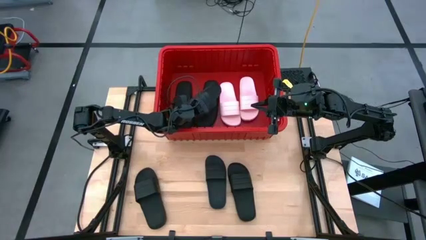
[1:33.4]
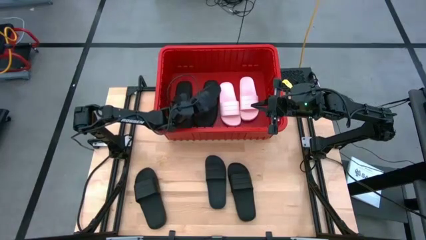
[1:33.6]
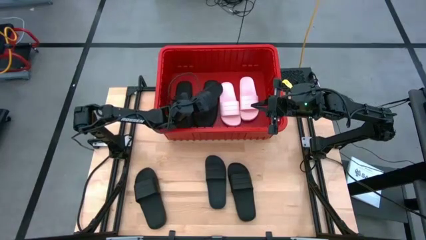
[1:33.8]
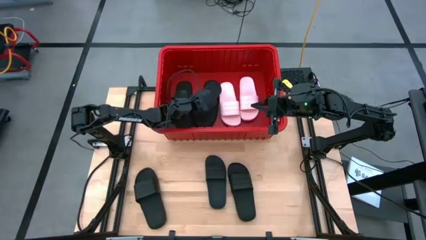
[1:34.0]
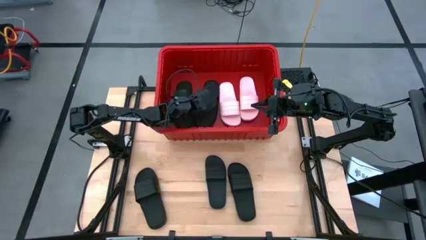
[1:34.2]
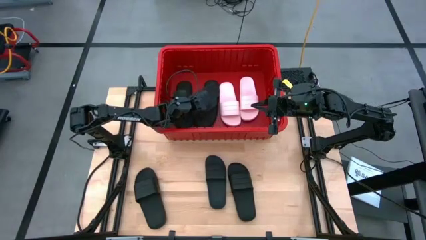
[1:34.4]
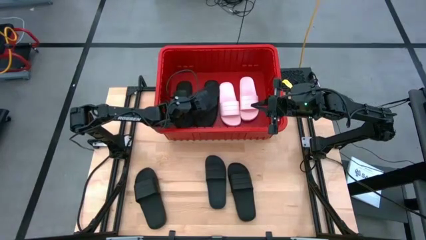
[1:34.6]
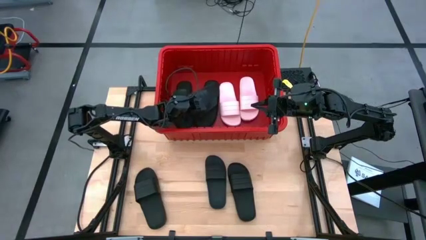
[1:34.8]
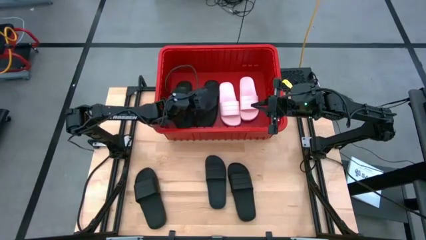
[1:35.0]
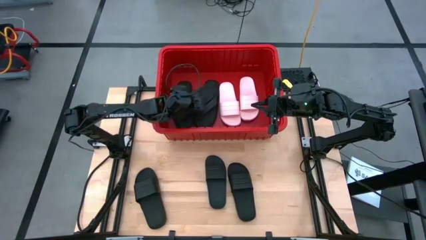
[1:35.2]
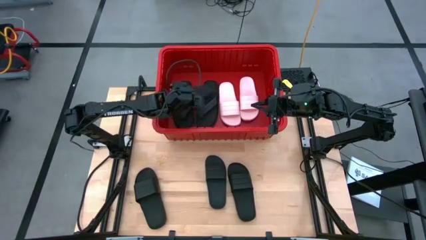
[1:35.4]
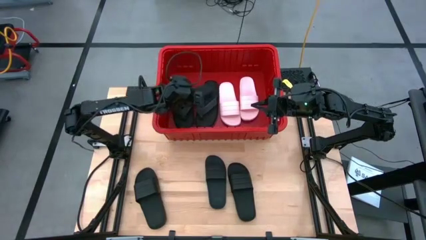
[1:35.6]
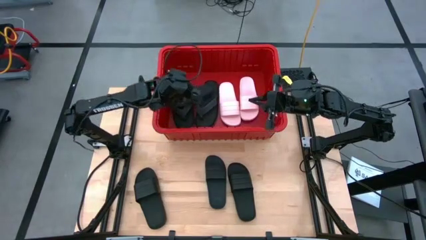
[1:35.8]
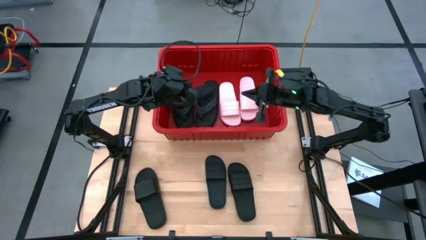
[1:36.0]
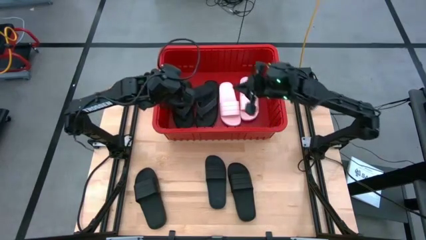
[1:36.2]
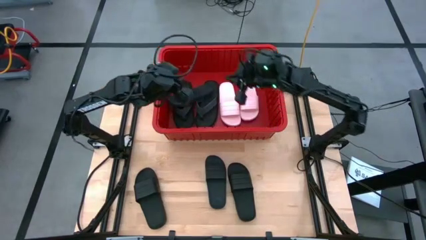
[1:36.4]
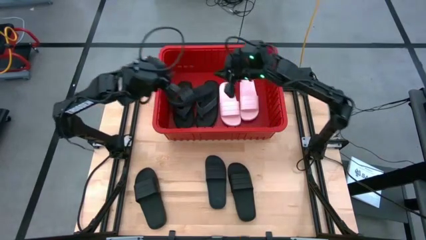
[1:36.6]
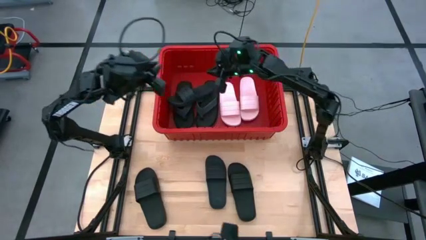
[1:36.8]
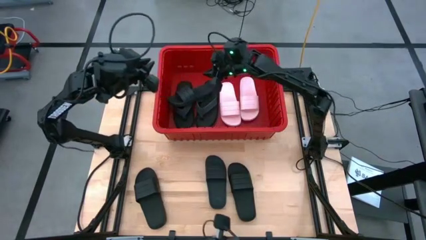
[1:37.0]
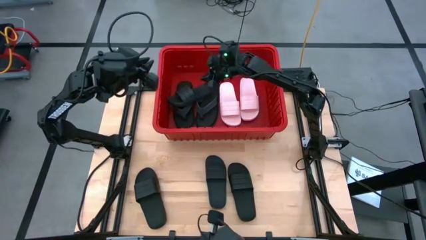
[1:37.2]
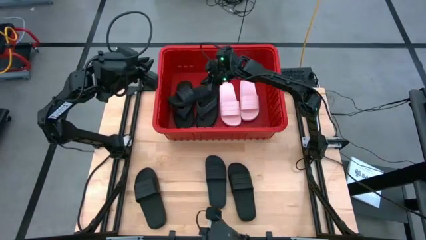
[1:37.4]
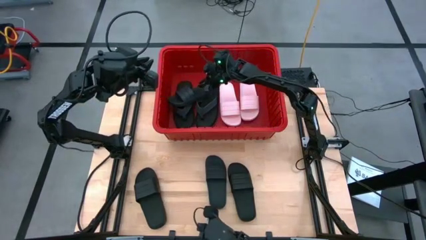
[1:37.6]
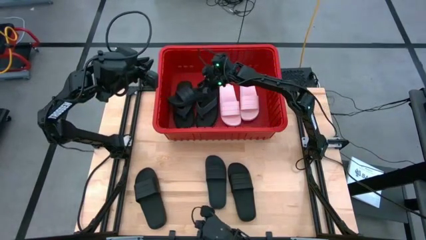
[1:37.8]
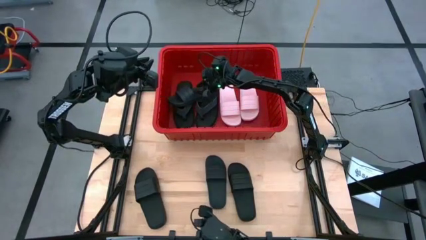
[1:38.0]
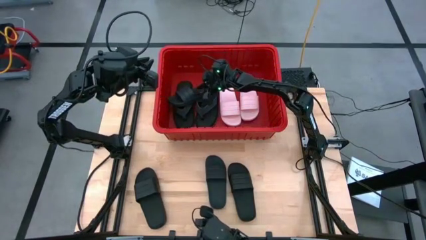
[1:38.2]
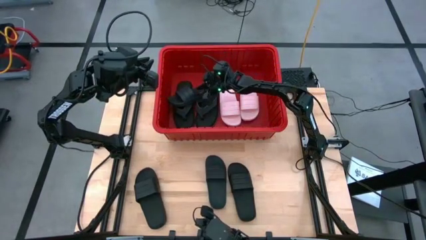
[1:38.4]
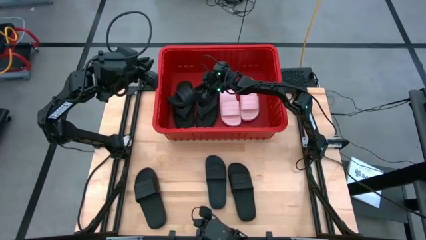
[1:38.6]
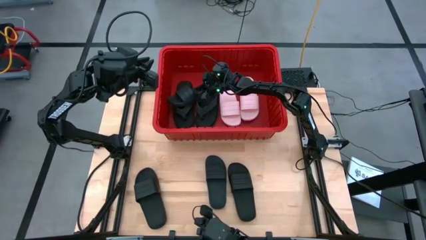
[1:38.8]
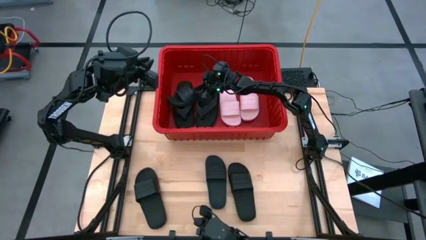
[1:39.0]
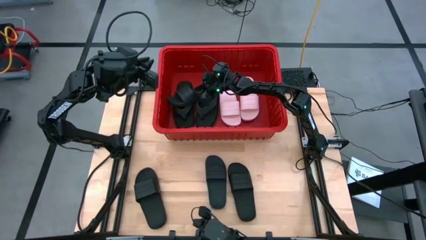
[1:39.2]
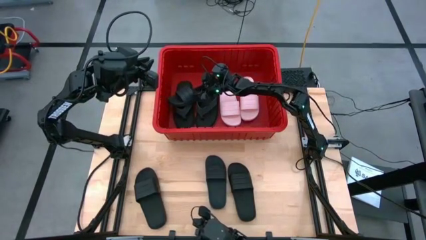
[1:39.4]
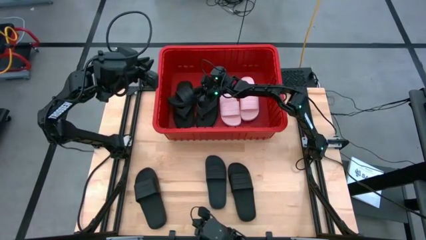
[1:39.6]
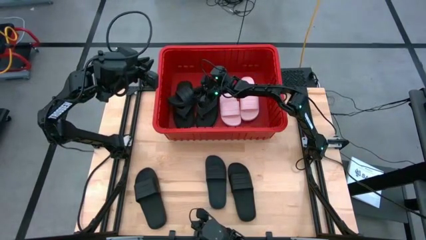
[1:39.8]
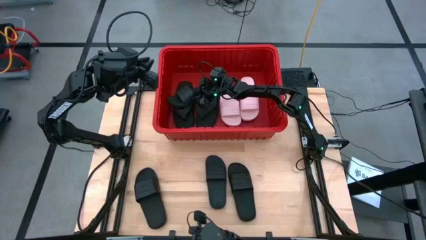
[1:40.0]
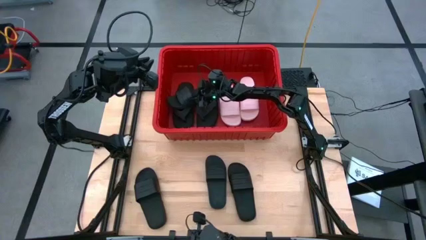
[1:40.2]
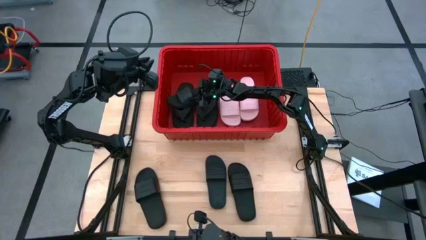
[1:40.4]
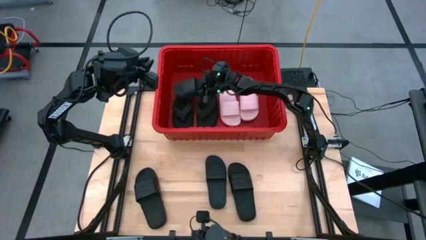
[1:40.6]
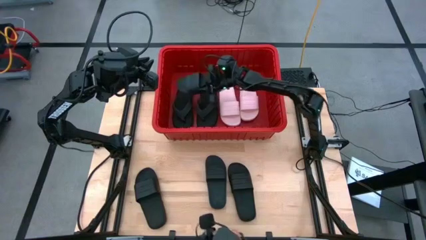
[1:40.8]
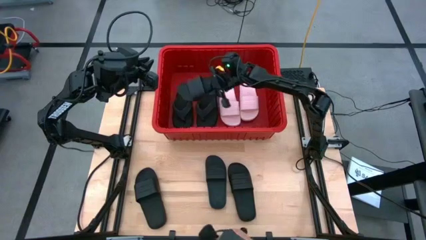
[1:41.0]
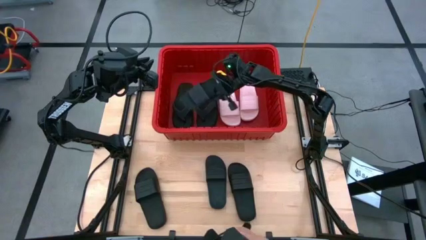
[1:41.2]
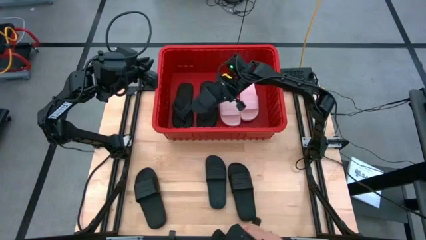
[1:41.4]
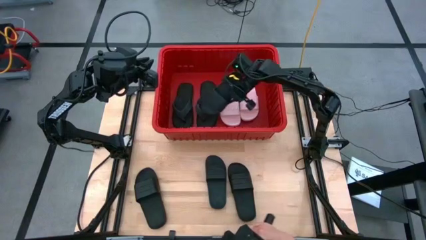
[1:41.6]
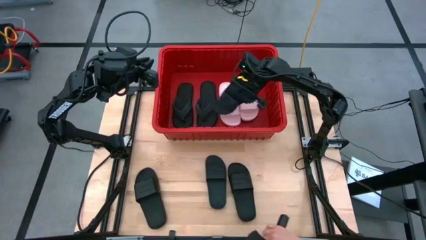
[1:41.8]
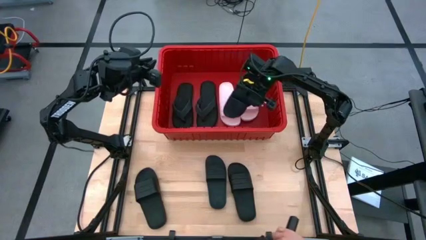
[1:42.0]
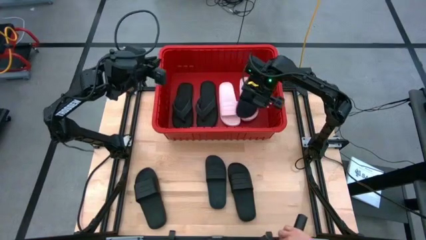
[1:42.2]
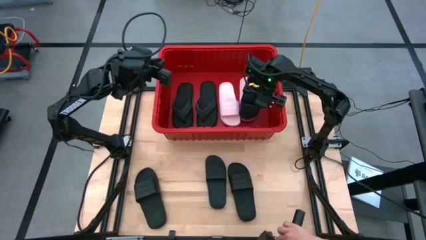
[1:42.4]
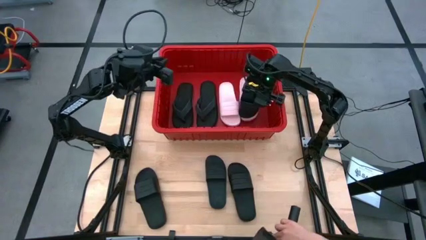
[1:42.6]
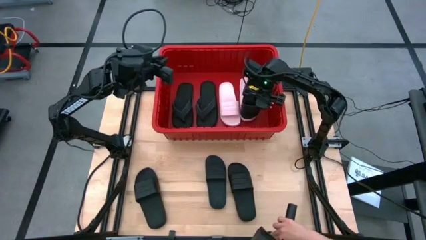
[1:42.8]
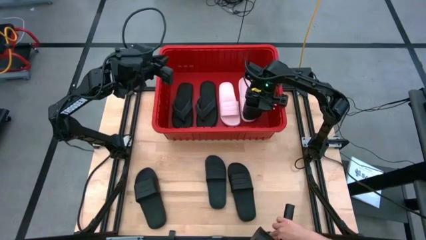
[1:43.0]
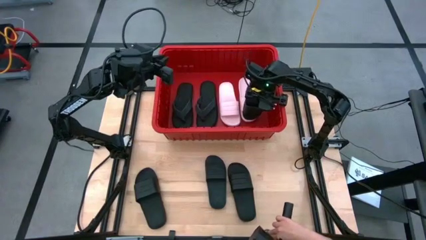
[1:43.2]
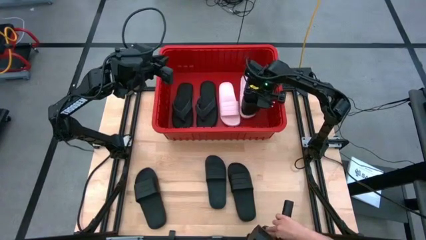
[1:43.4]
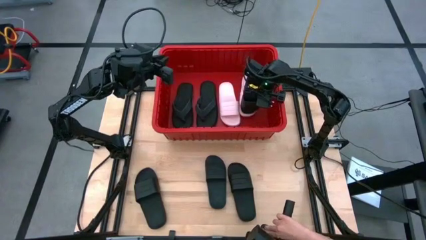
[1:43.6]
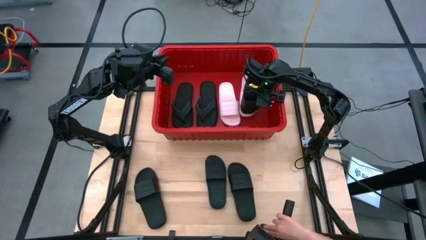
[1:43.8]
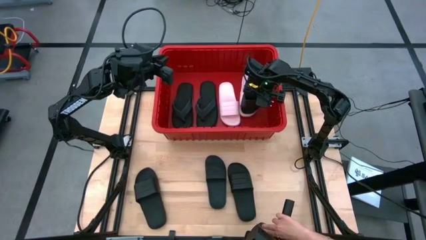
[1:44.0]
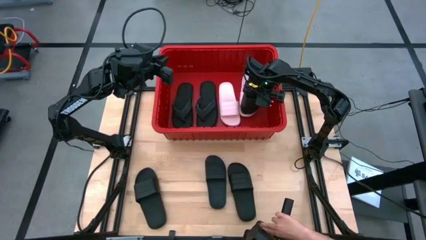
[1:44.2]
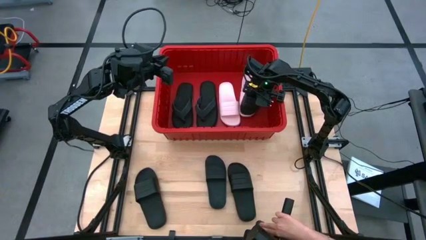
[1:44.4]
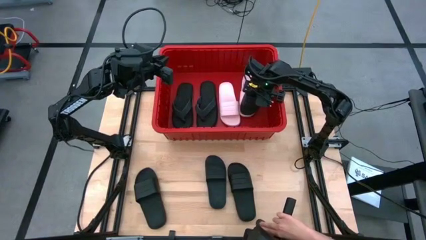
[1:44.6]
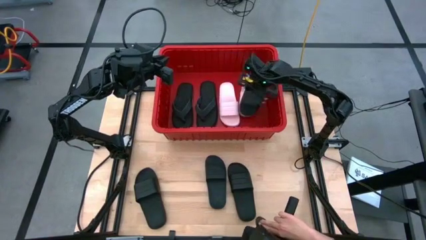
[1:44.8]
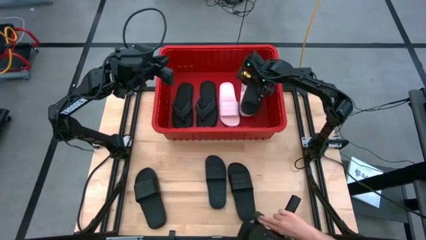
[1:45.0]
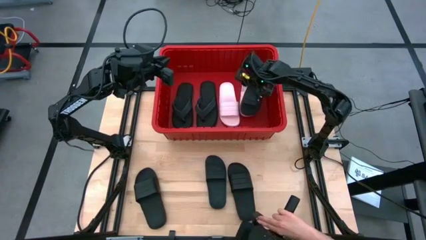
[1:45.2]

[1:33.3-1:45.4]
Task: Pick and place slides into bin
Put the black slide into the red bin

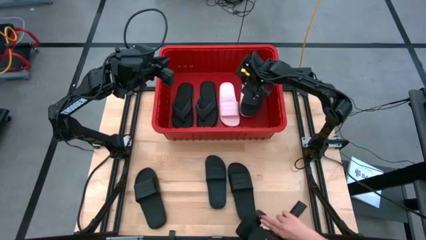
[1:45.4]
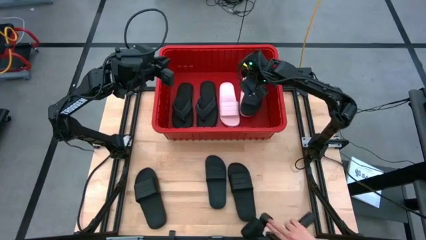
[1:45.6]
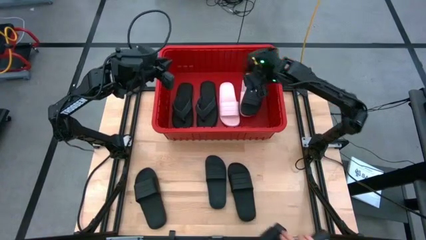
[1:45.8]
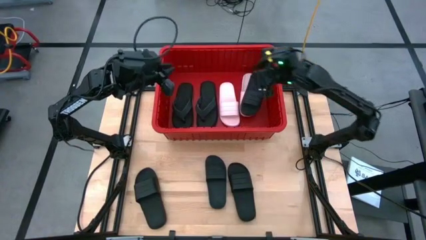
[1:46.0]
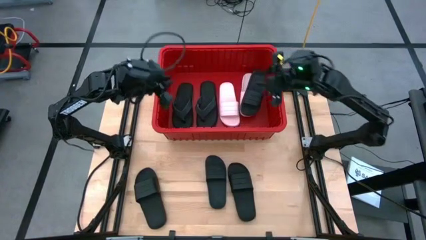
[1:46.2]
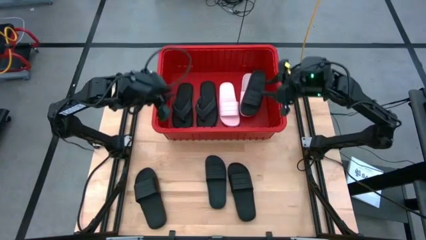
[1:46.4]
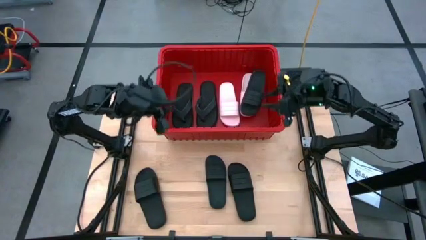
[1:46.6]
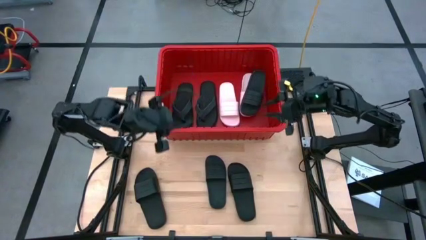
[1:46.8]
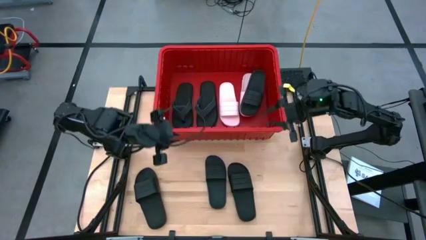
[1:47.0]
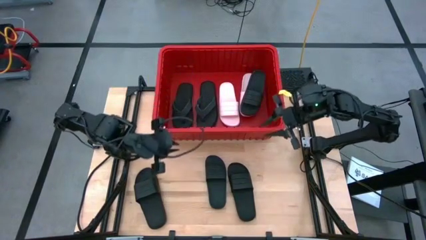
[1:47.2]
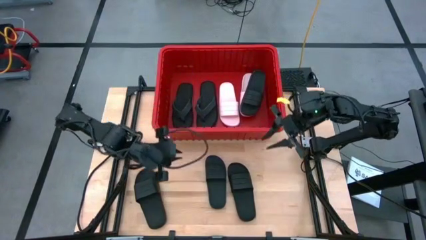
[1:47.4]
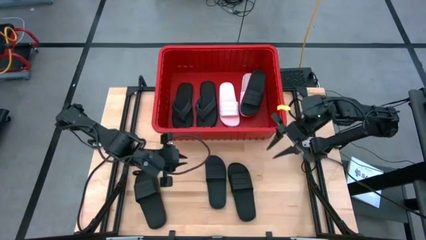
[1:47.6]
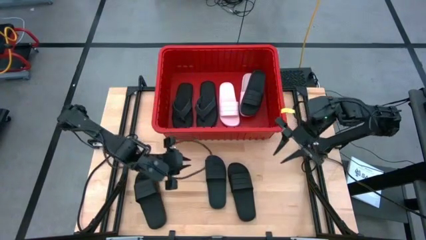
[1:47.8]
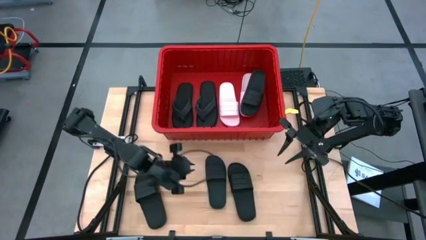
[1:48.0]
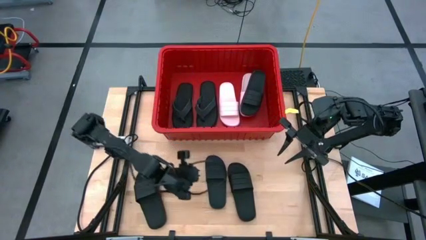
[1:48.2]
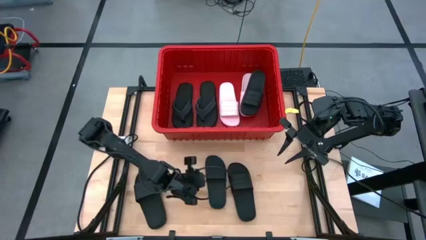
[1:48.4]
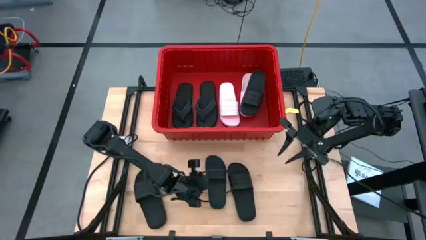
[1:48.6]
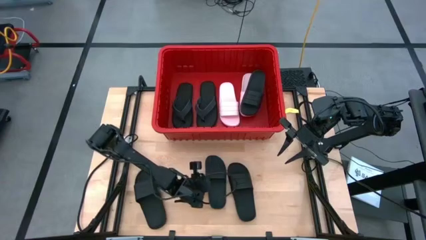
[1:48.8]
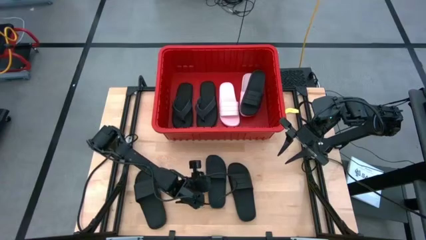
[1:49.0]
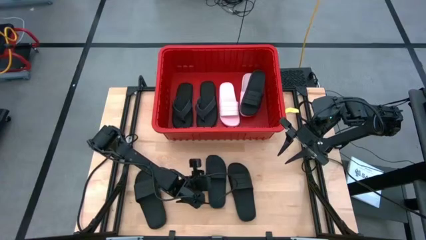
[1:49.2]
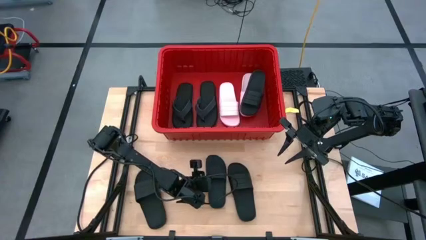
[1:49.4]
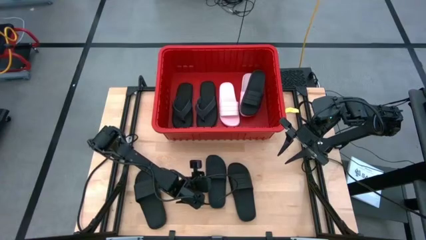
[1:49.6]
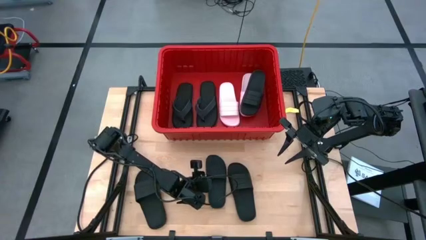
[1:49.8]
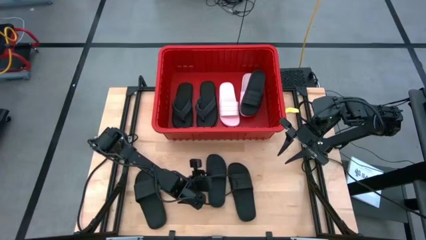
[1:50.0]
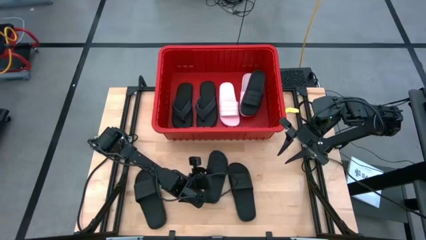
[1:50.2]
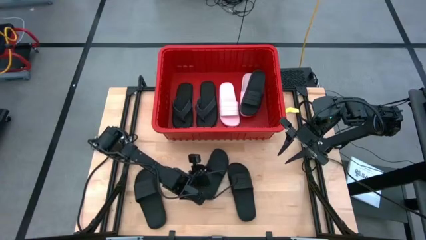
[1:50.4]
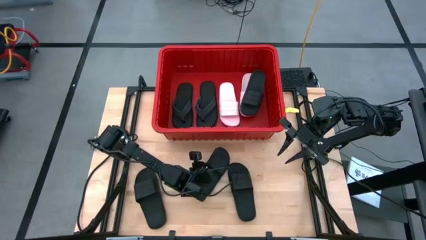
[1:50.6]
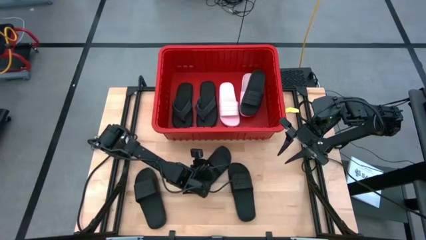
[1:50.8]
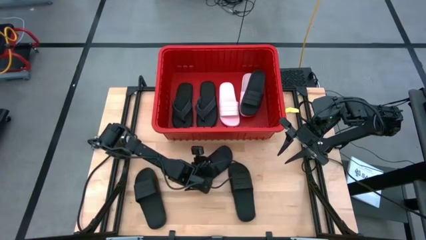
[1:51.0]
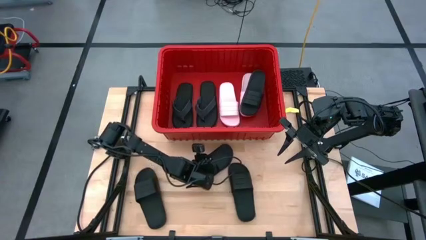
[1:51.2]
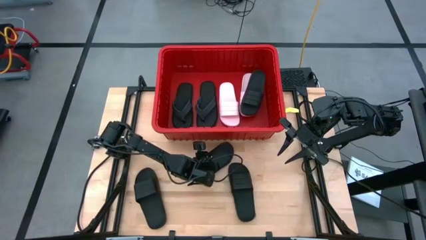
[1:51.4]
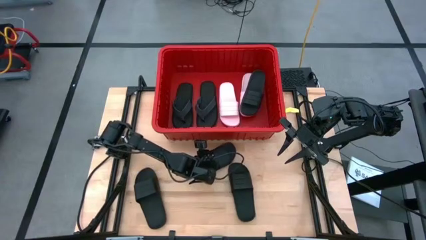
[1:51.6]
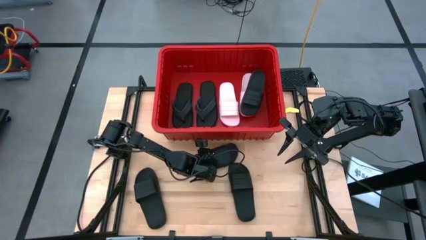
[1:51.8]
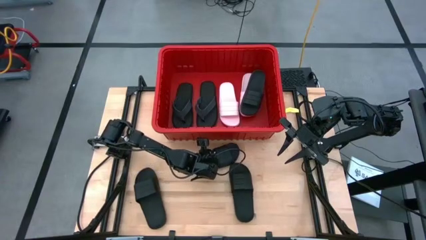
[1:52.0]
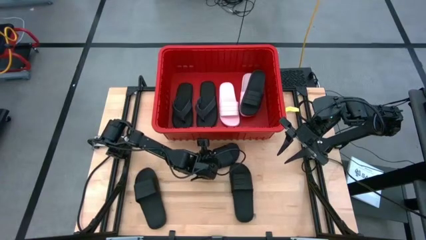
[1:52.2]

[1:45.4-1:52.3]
Put the black slide into the red bin
